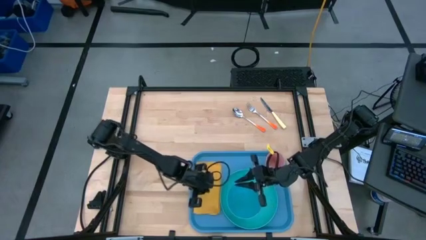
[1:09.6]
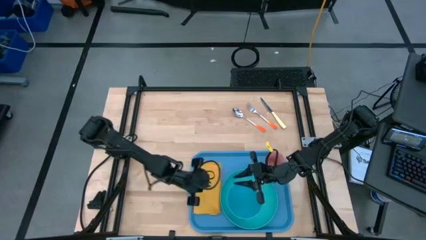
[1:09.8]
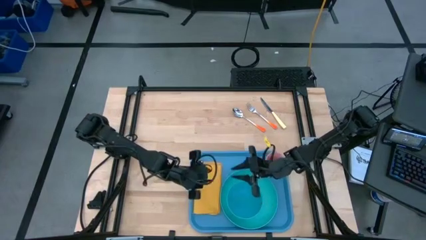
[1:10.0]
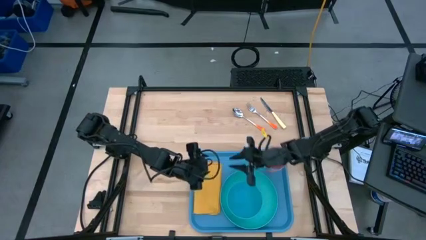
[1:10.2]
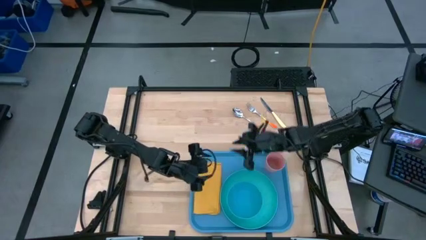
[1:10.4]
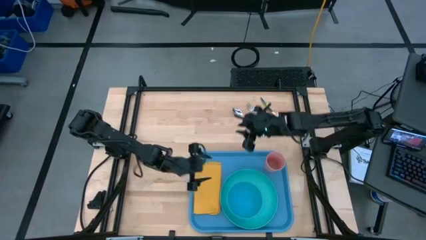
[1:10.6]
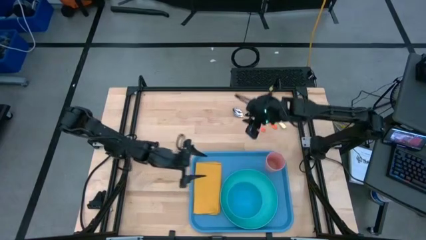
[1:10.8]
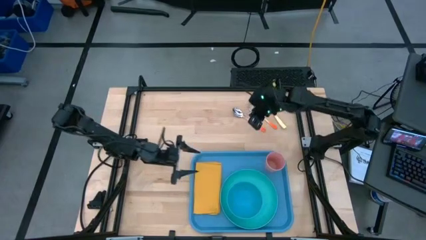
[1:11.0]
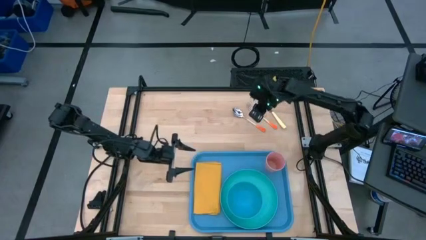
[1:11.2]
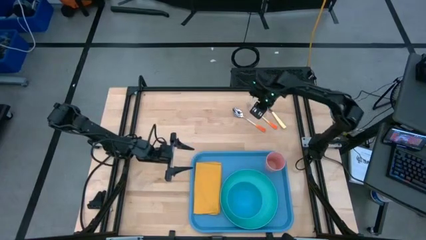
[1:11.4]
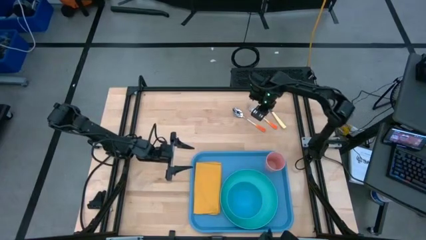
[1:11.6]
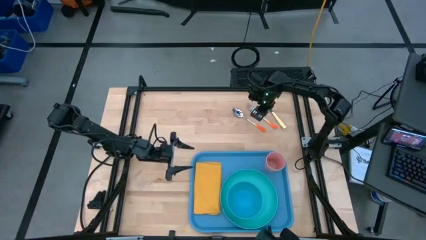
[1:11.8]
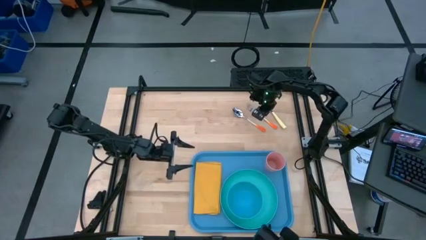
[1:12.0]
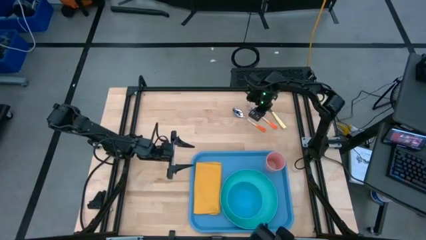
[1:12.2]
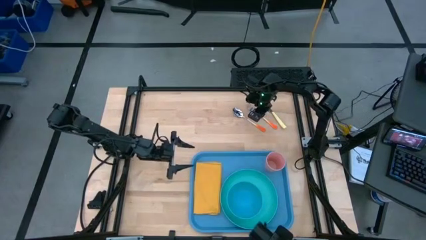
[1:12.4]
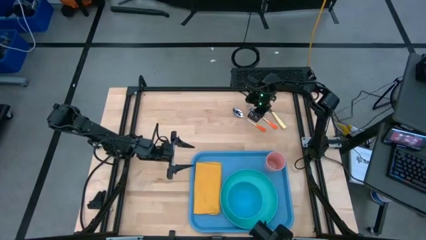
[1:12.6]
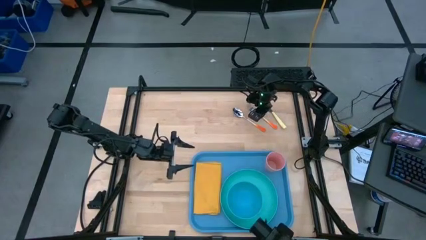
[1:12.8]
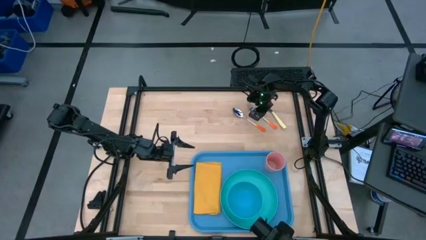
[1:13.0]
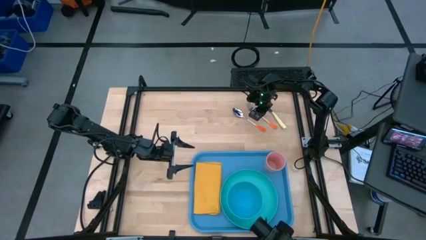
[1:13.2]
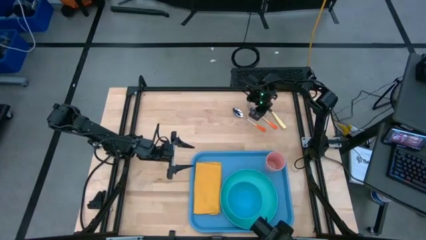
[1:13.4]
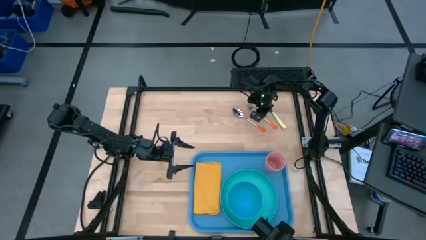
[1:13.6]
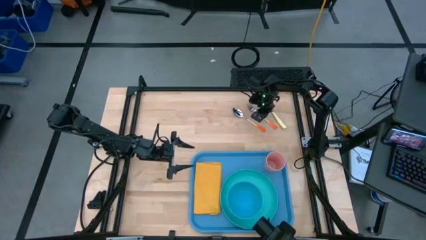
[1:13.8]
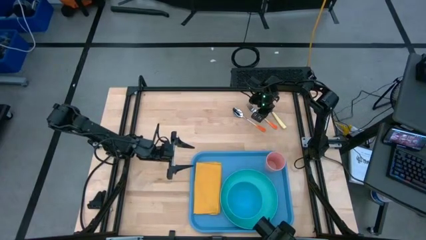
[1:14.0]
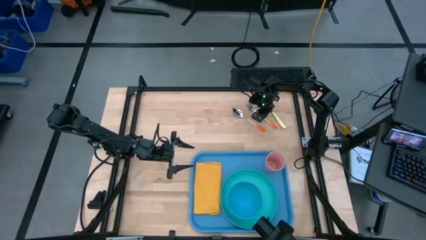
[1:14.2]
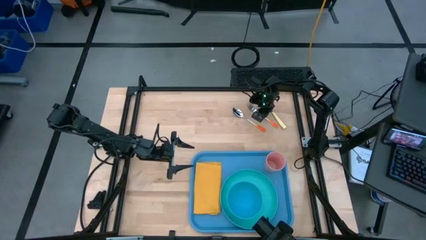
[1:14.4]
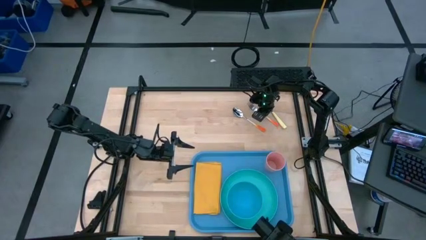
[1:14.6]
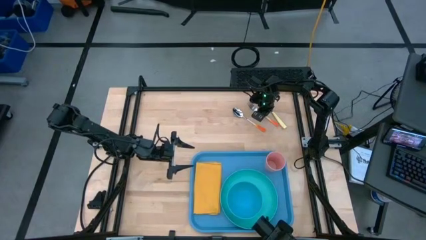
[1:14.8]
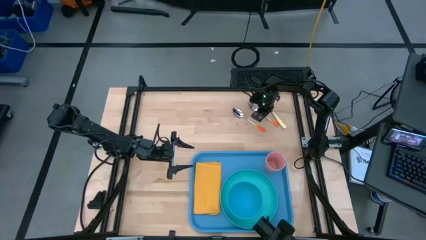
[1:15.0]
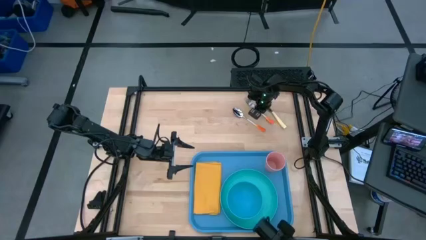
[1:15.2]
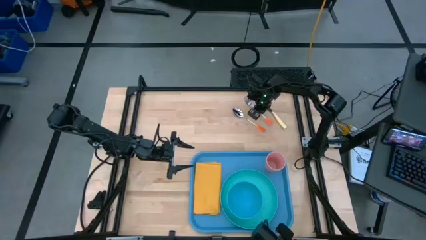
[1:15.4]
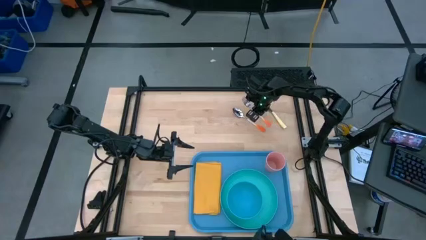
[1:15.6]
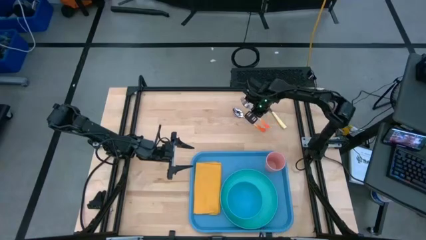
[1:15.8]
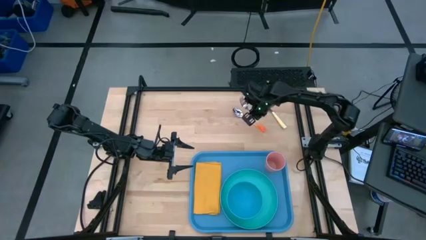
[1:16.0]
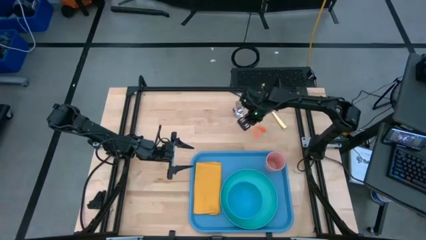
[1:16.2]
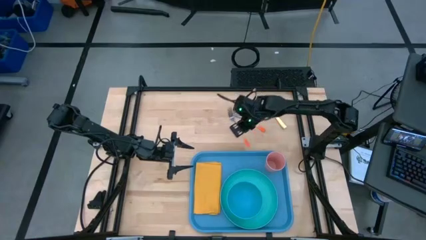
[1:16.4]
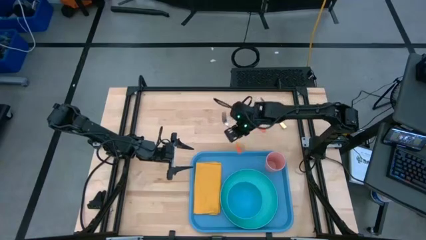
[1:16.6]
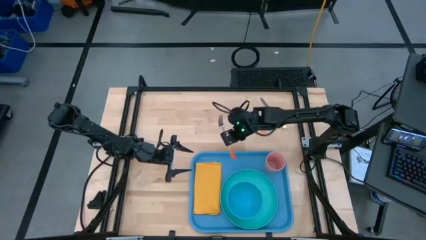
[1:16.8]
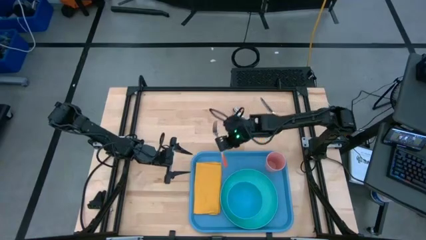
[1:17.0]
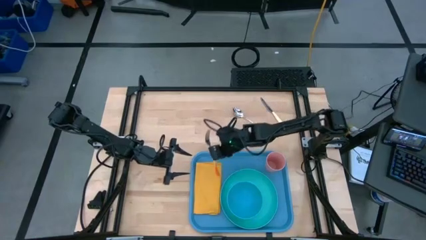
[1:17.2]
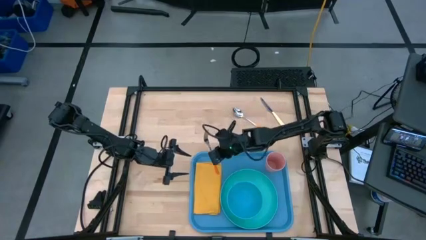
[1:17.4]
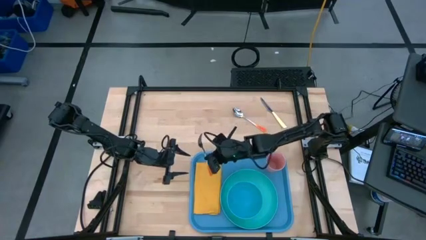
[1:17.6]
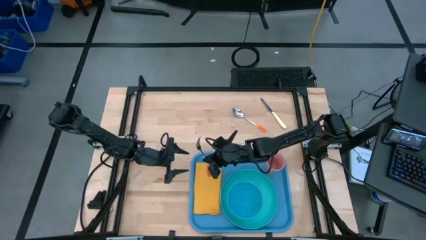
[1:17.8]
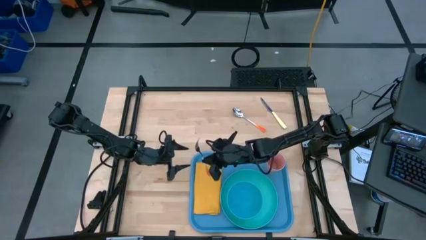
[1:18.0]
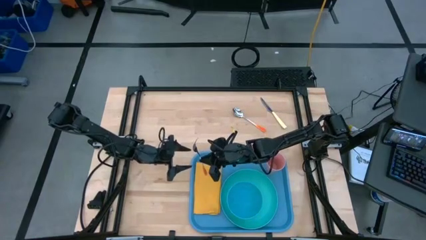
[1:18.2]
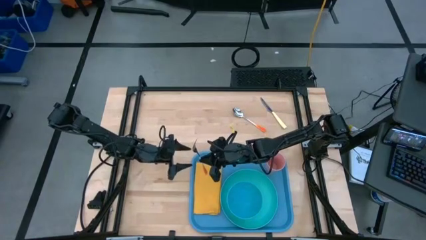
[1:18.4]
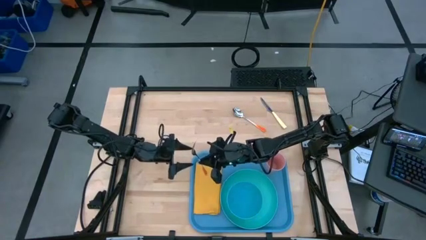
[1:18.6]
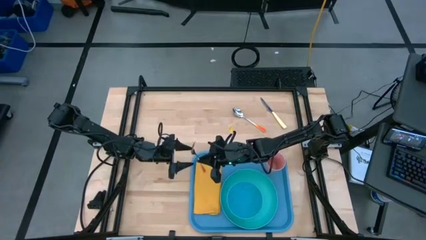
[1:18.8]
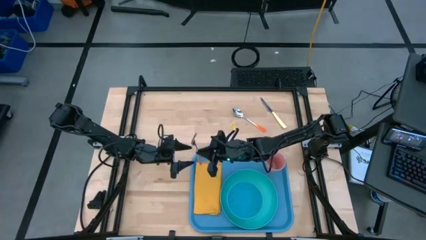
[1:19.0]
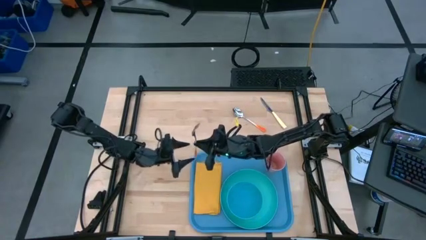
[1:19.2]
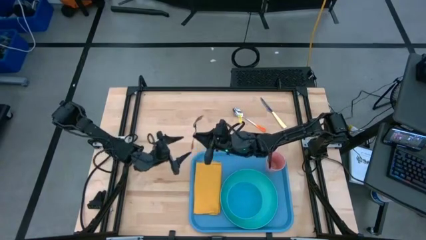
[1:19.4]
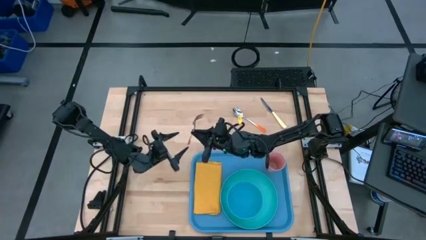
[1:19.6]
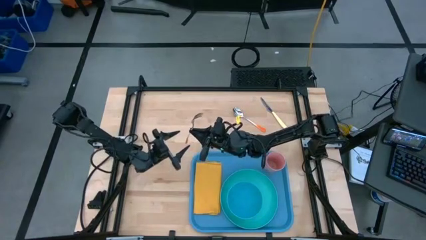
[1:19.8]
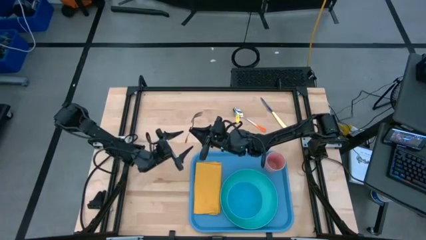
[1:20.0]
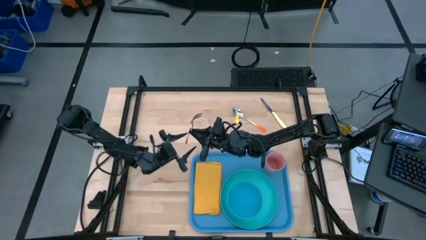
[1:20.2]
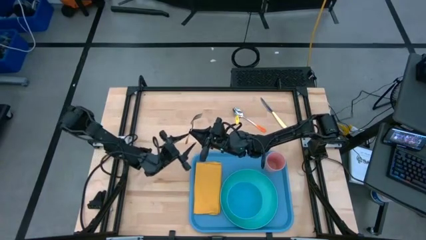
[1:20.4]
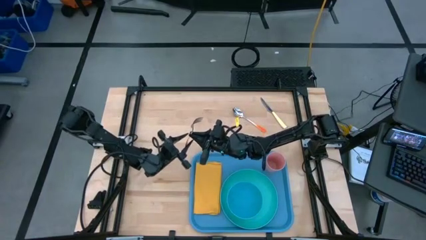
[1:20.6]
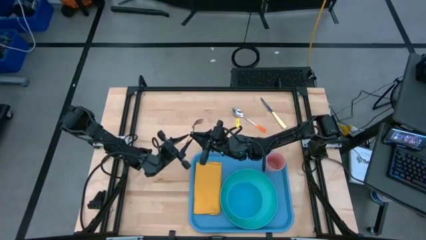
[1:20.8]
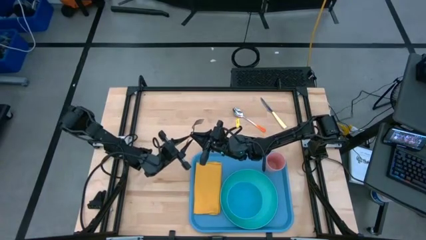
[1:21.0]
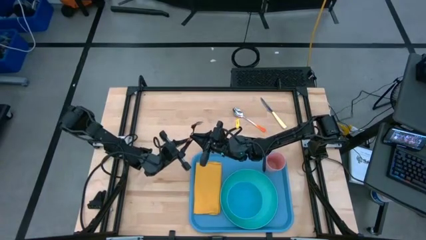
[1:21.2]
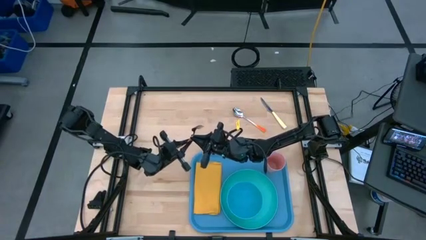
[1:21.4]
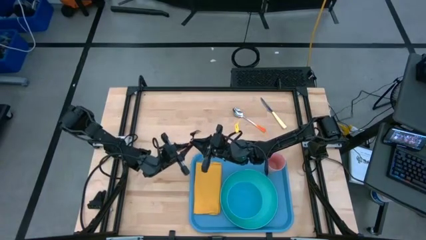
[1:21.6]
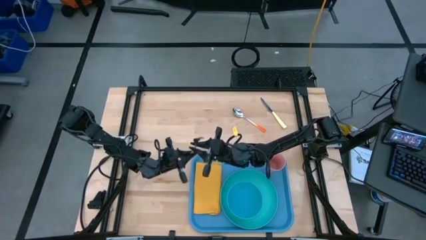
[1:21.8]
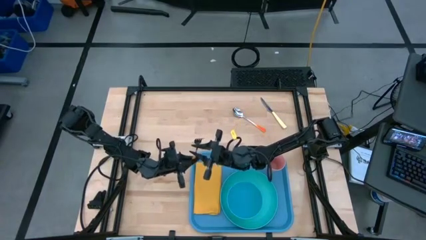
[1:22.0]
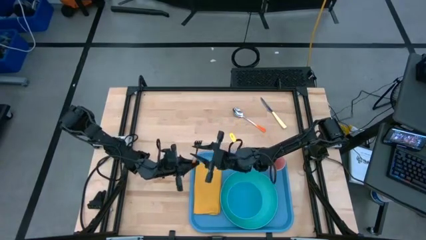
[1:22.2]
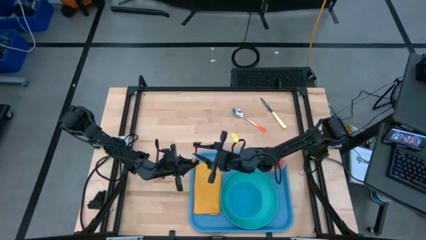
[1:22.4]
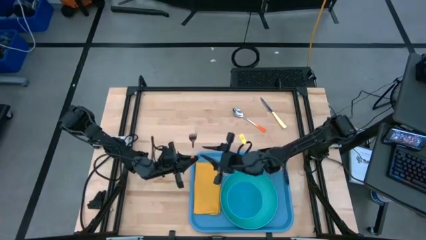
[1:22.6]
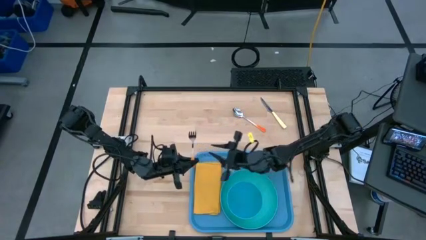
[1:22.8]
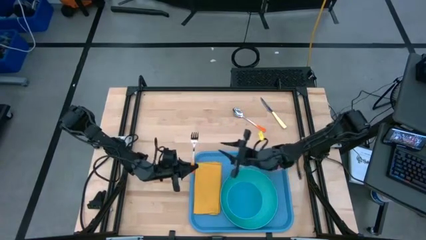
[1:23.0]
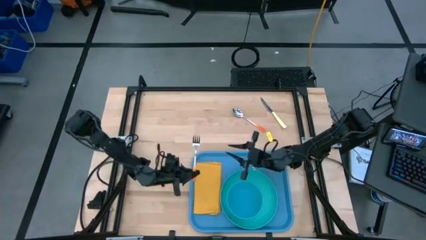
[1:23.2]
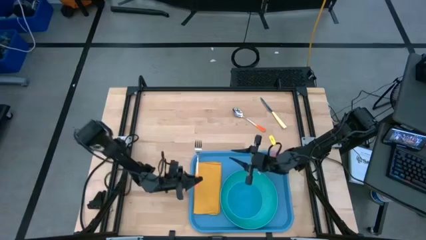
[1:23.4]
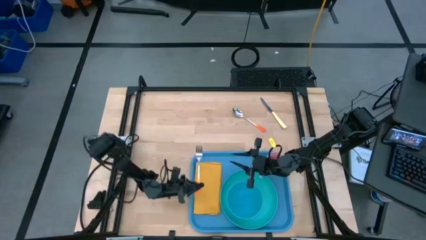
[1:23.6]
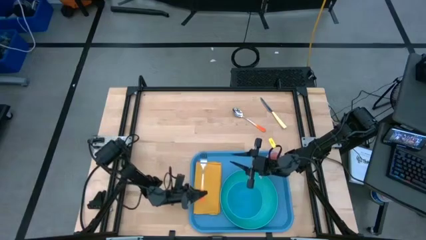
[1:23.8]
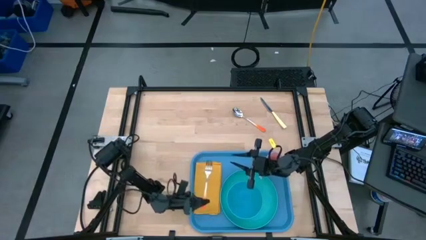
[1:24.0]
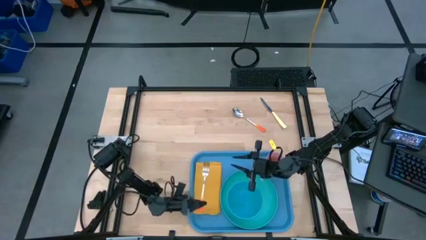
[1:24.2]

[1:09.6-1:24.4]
Task: Set up tray
Put the orange fork on the orange napkin

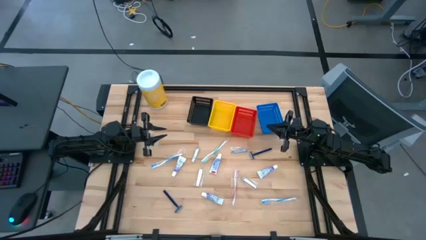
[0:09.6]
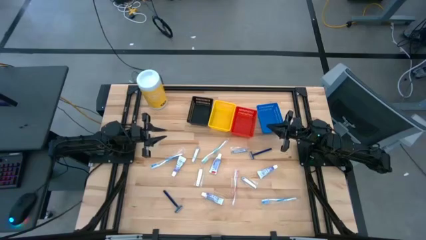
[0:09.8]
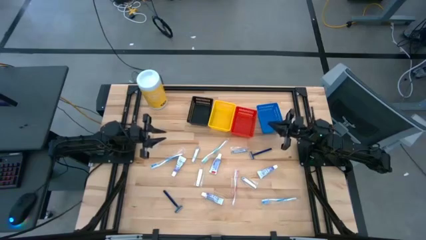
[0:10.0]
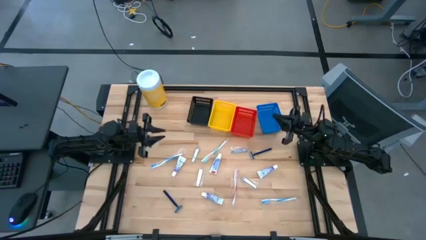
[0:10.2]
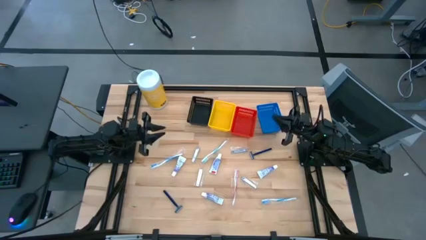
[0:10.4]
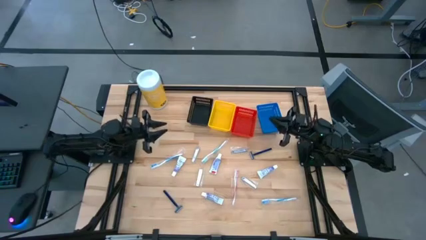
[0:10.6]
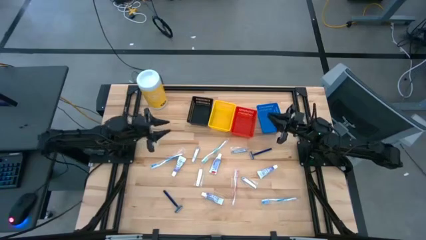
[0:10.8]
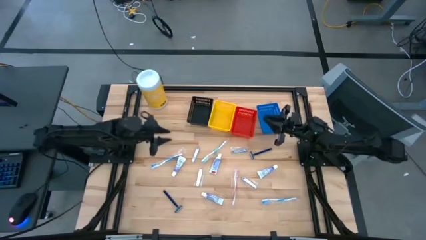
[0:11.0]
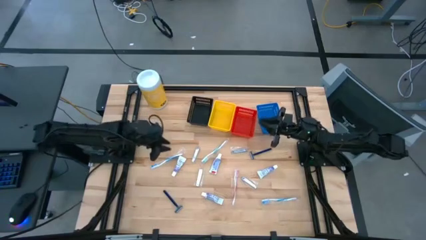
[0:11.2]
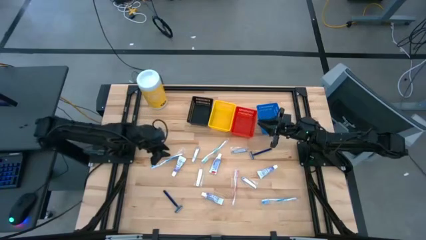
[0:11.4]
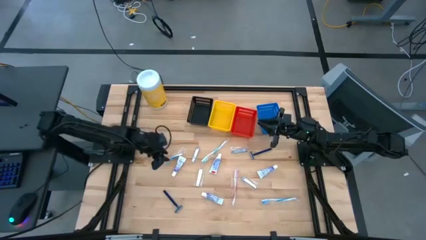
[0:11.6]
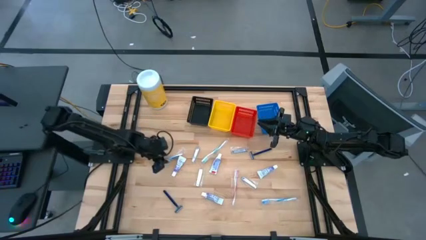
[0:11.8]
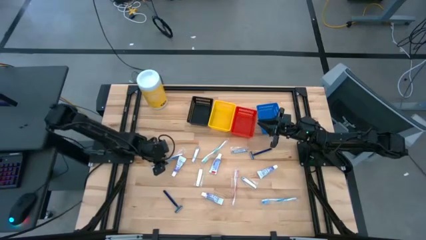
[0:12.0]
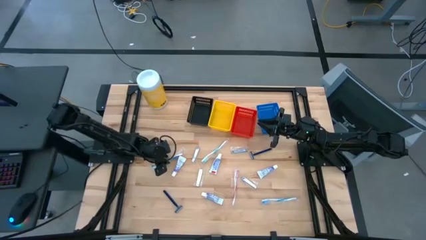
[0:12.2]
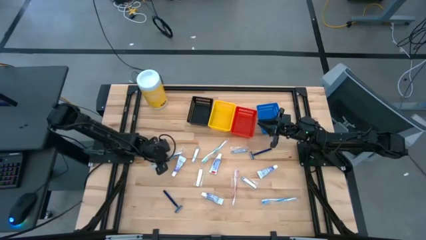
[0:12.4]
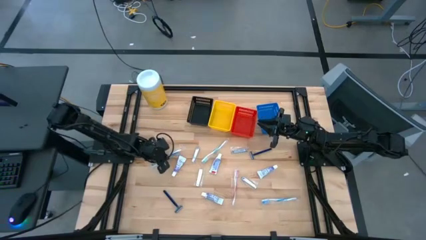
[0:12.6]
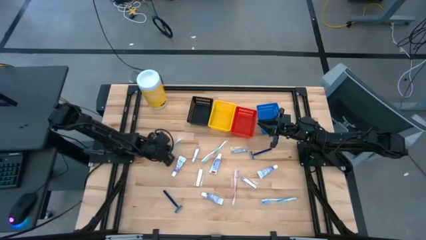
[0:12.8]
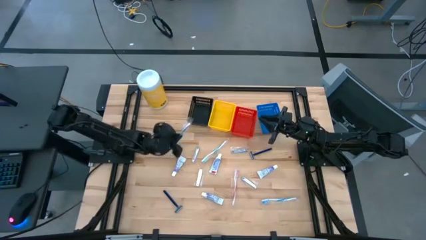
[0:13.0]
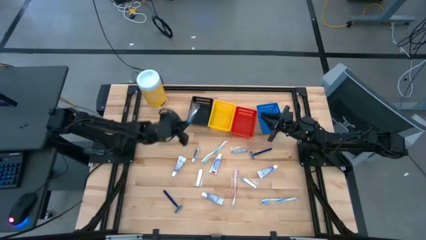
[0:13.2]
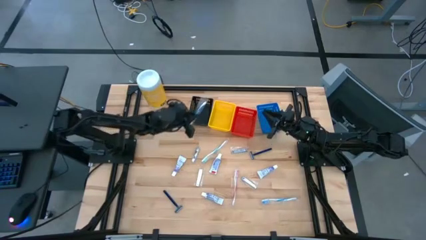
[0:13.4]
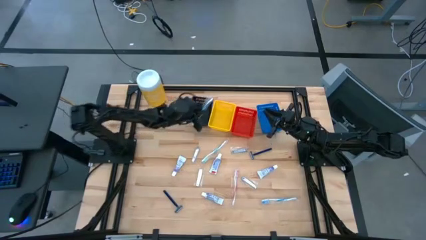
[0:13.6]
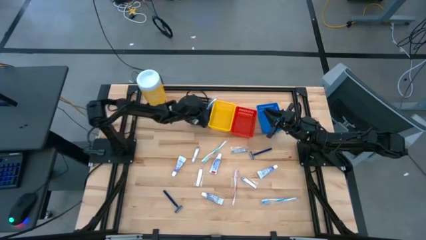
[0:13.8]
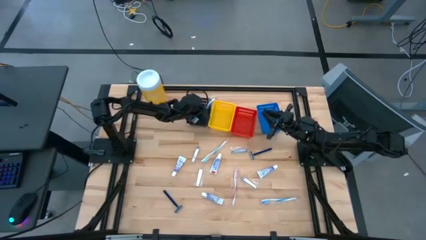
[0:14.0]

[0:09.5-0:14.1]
Task: Pick & Place Travel size toiletries
Put the blue toothbrush into the black bin
